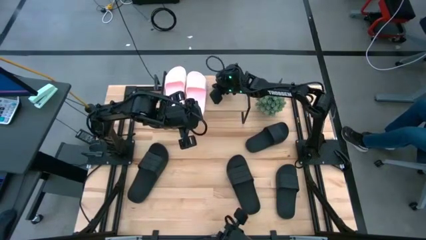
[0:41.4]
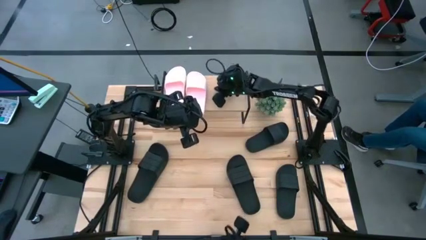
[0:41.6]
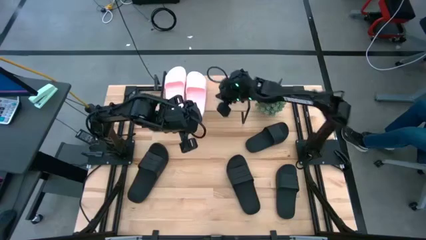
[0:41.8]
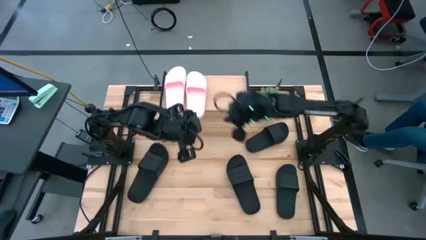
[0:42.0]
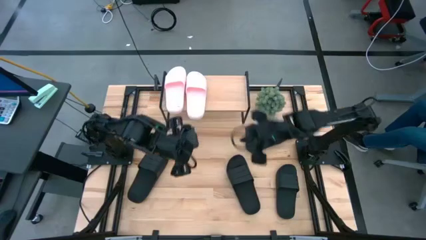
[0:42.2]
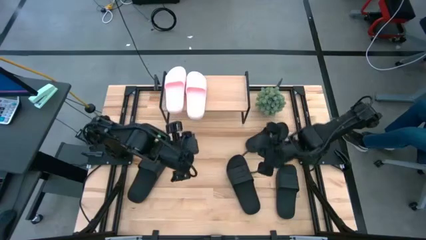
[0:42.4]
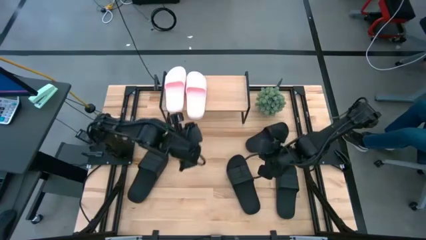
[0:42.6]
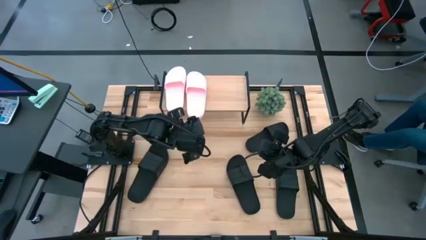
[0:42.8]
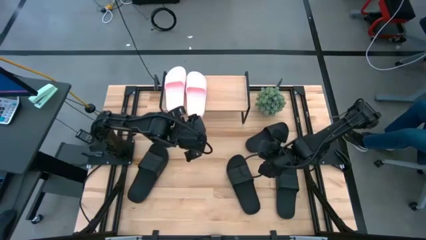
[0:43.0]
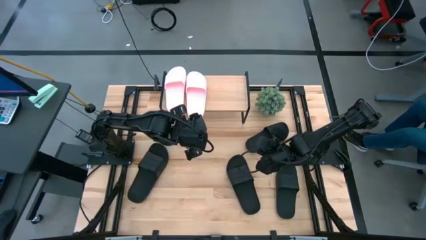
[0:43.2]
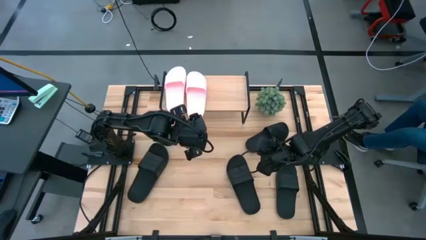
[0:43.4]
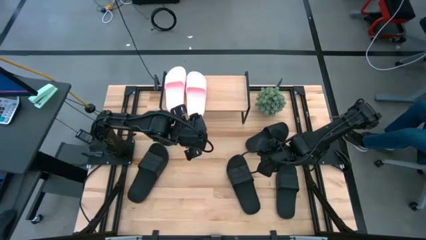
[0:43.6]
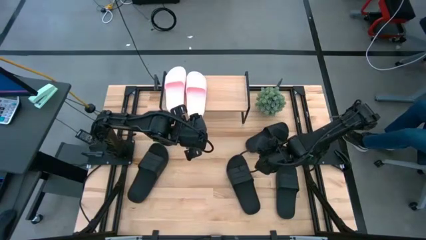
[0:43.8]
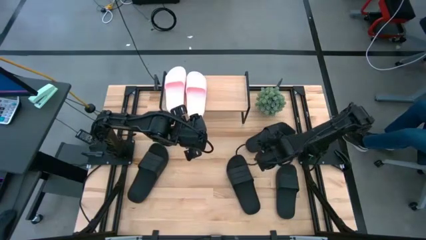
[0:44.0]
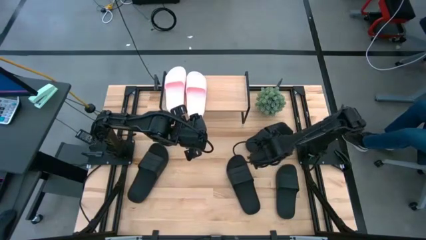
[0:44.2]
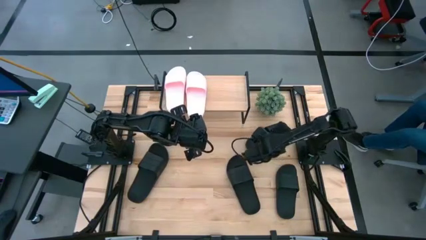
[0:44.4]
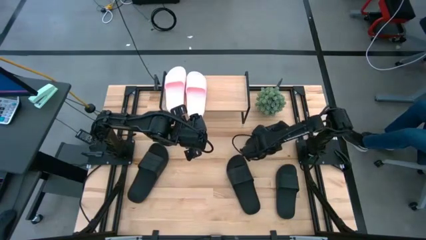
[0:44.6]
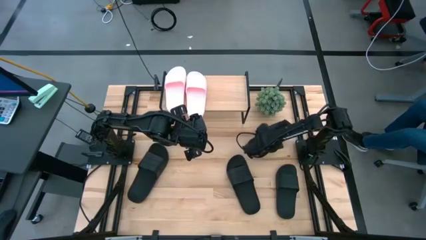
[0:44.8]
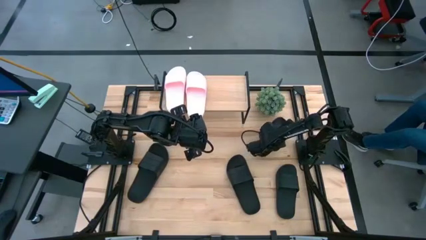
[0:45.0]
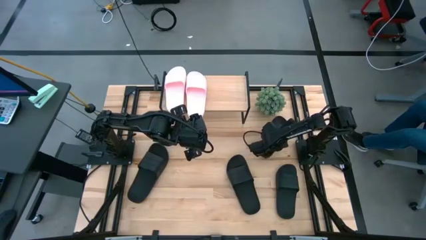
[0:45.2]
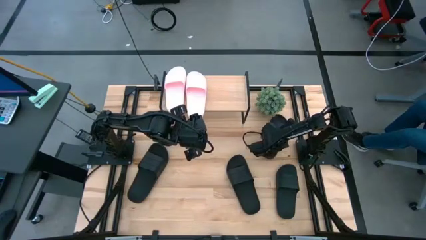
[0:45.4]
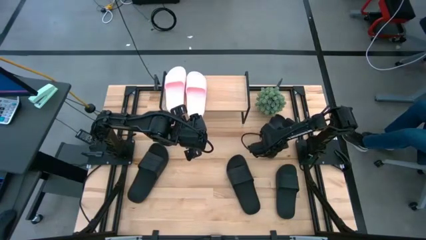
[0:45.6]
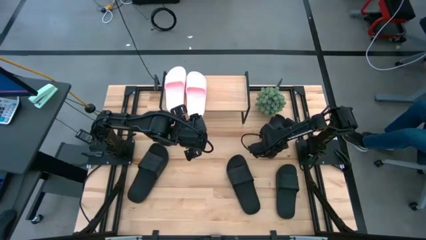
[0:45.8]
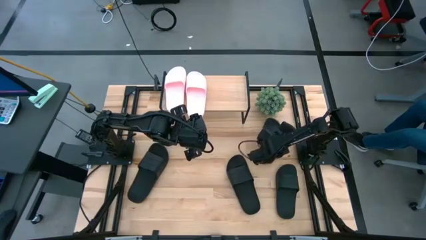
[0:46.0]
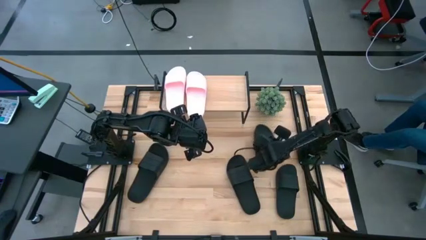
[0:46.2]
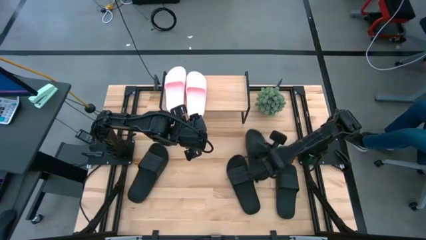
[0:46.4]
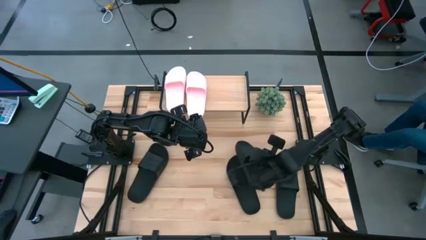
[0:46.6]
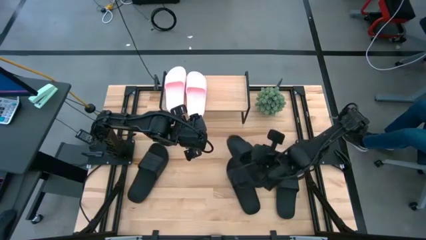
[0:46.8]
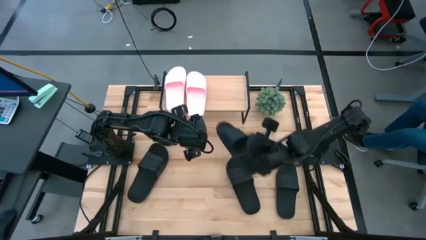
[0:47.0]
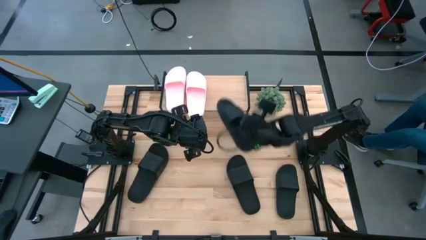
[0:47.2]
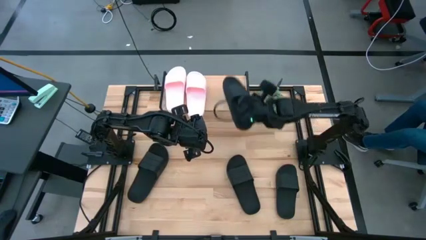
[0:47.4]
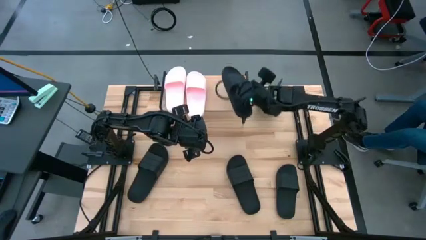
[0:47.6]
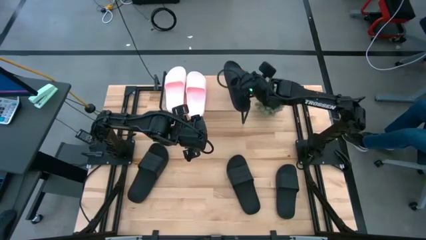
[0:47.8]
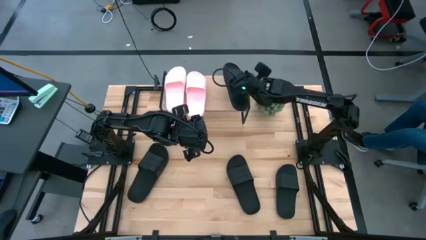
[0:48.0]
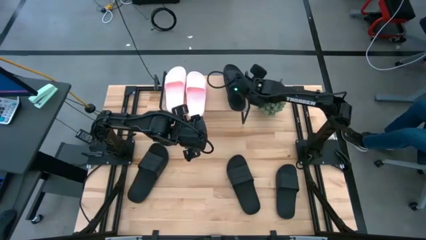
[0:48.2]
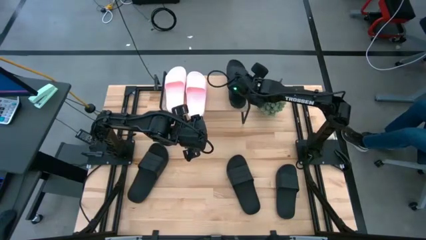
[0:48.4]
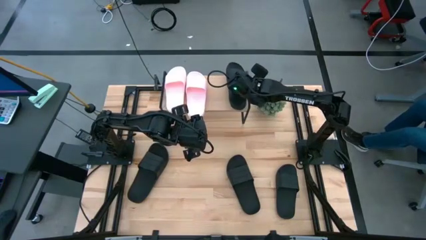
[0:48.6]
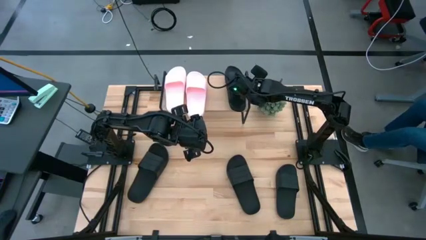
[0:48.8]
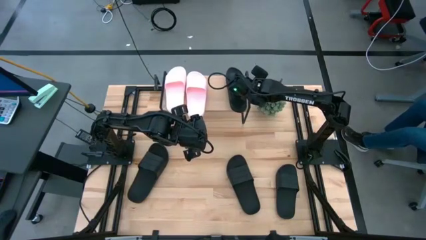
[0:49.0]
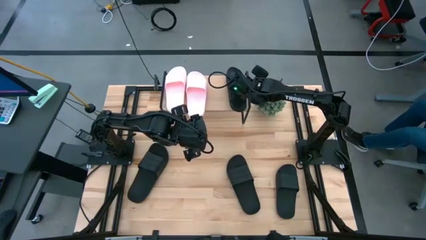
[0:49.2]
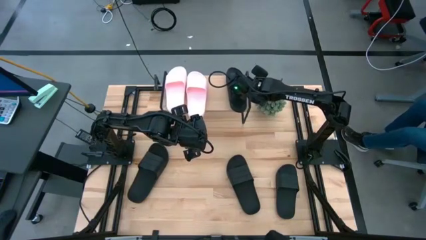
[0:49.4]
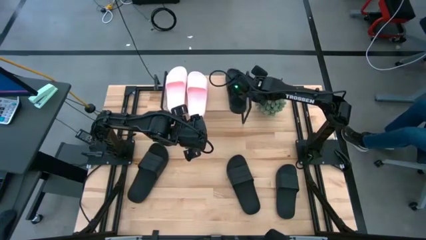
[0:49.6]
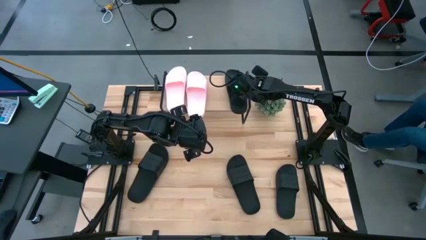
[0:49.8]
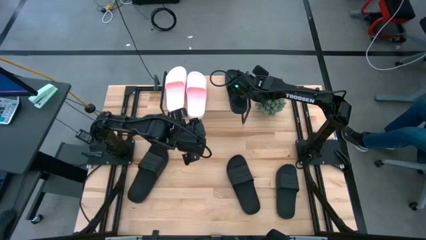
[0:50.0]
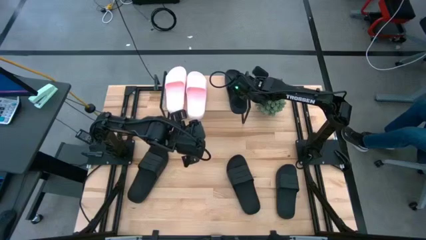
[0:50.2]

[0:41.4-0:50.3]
Task: Pick and place slides into the shelf
Put the black slipper on the shelf

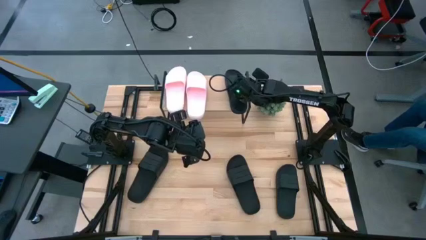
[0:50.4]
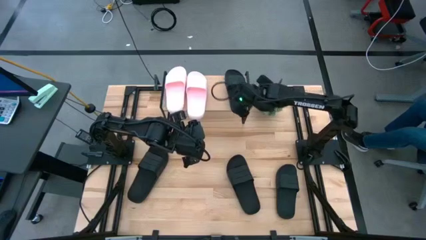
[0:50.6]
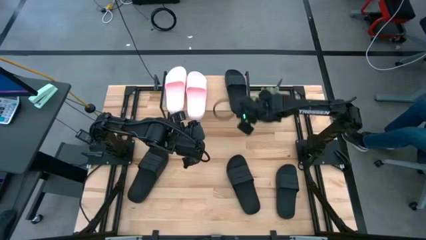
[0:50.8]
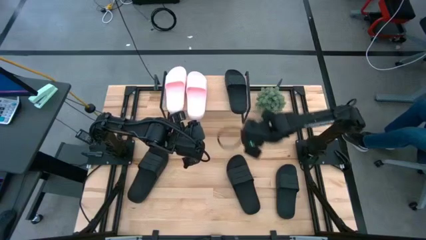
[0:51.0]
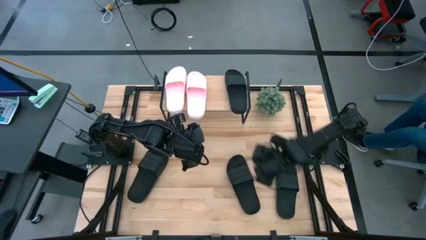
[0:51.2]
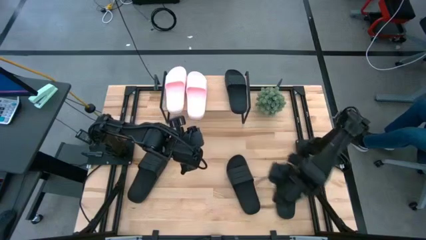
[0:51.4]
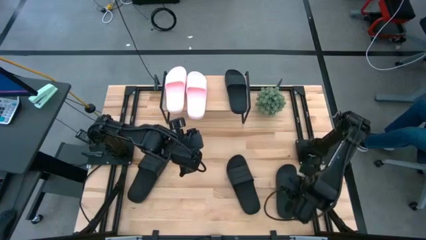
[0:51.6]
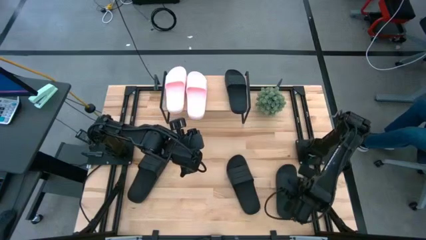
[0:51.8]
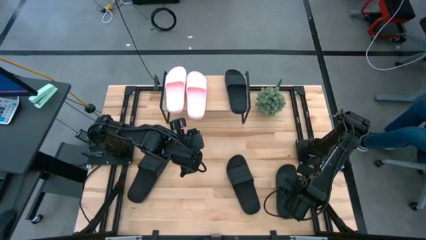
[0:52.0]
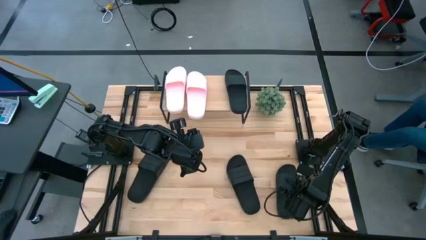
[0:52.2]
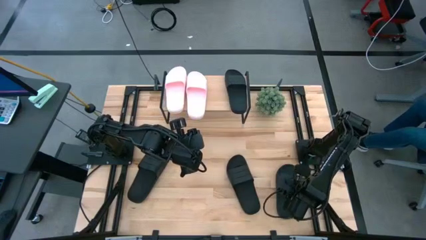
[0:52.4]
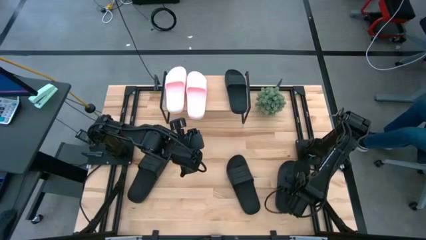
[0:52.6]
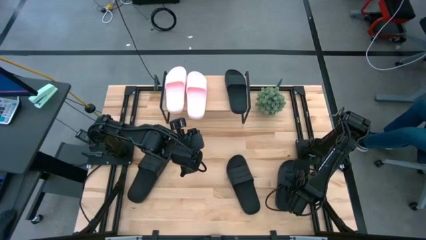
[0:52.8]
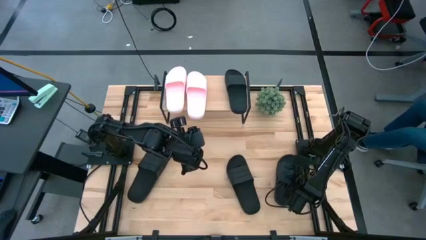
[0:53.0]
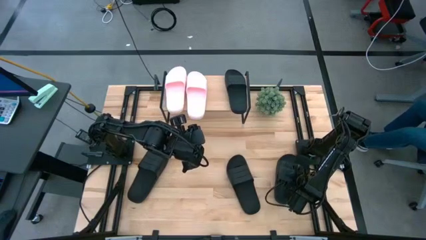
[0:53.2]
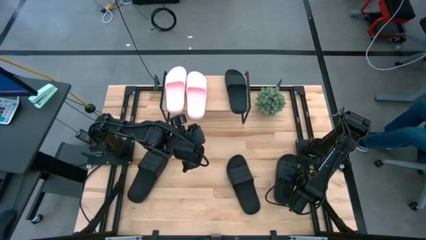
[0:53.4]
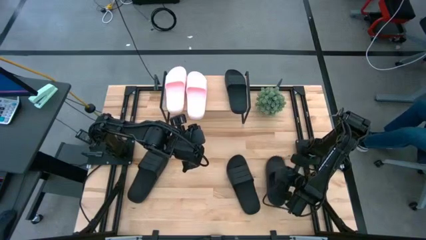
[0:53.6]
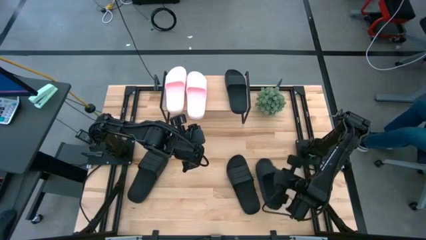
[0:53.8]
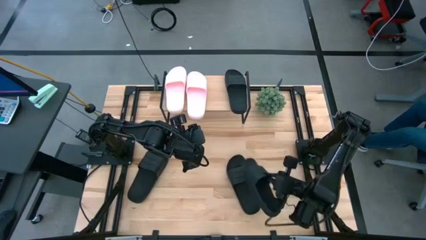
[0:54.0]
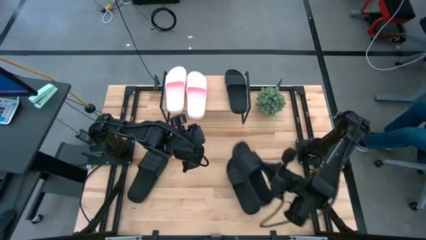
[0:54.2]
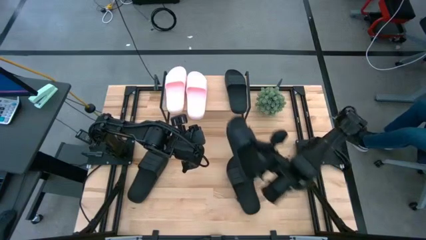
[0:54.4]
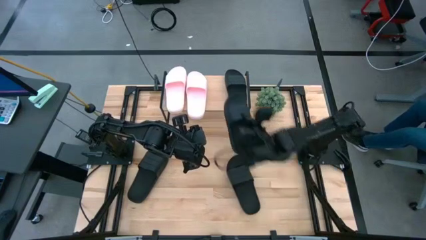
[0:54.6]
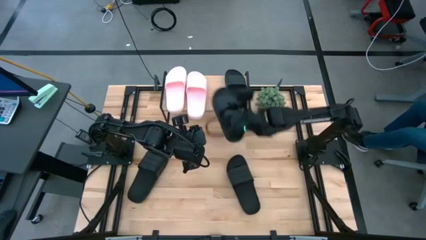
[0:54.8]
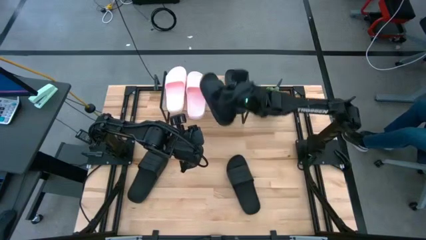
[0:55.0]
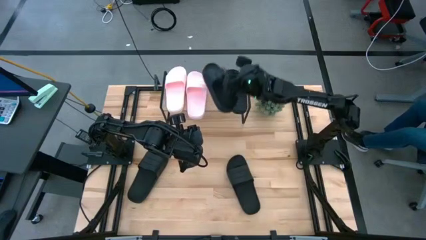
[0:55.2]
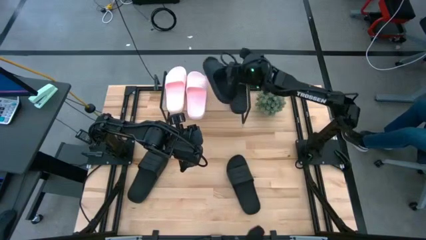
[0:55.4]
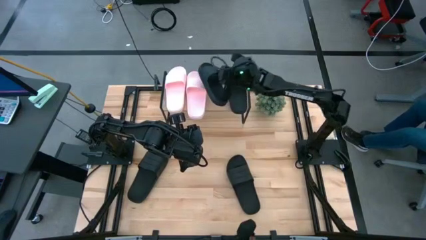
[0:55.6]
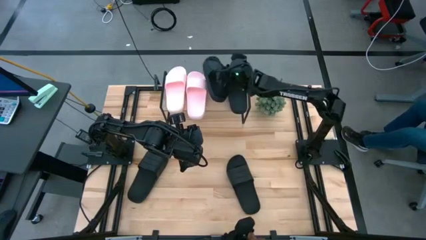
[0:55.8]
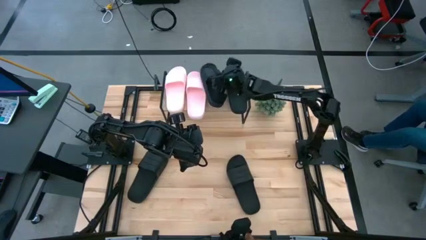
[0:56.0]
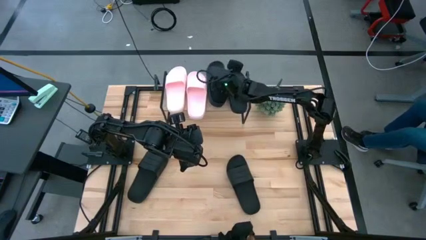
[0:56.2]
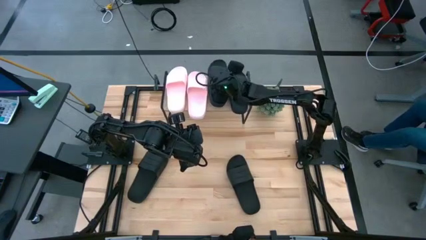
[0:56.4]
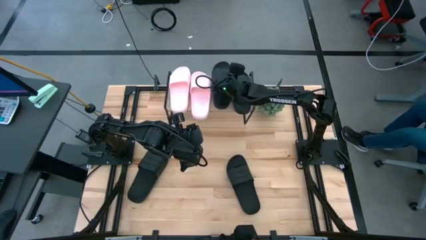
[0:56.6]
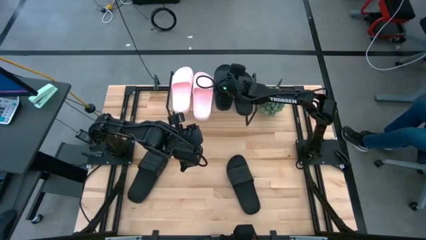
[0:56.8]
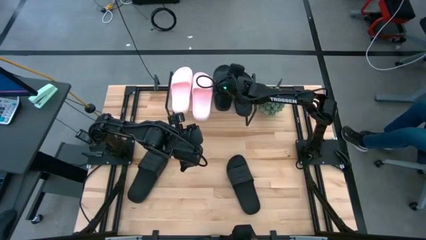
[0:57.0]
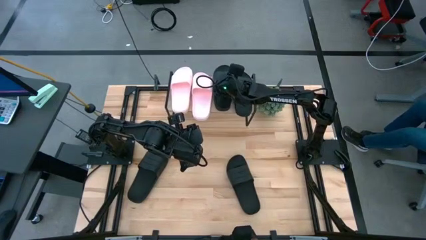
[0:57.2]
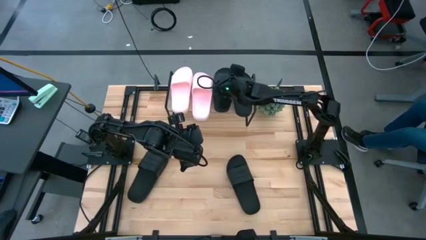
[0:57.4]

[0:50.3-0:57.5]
Put the black slipper on the shelf

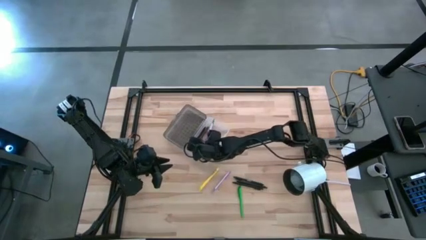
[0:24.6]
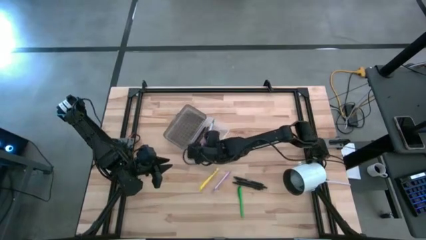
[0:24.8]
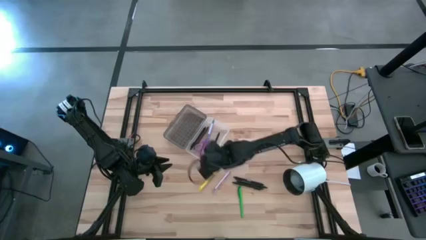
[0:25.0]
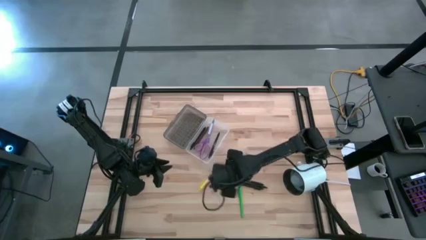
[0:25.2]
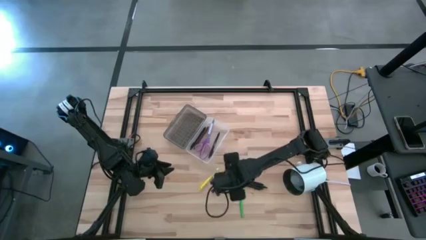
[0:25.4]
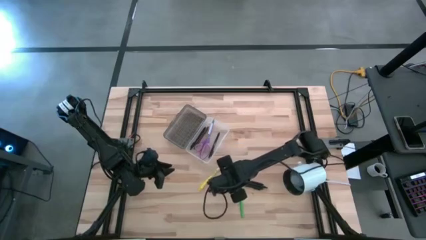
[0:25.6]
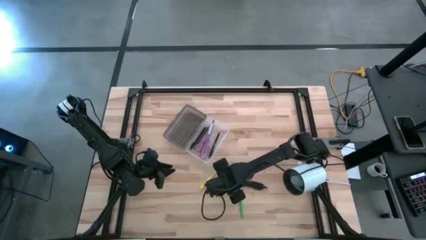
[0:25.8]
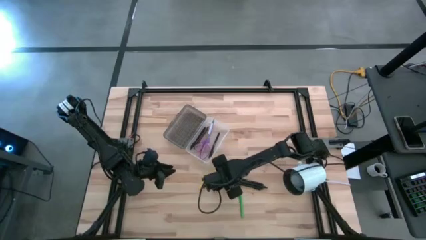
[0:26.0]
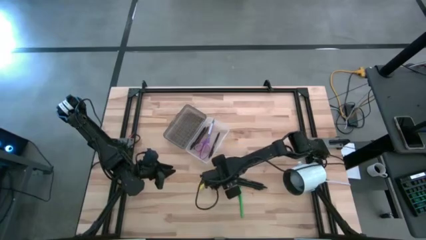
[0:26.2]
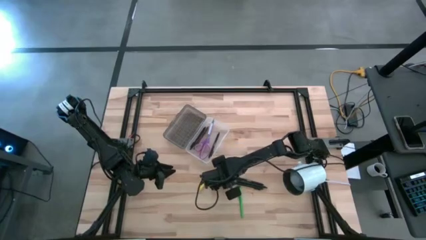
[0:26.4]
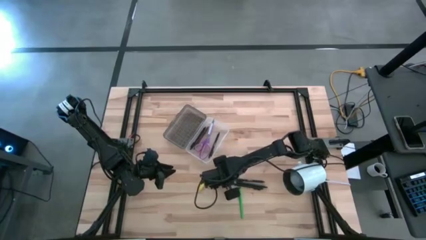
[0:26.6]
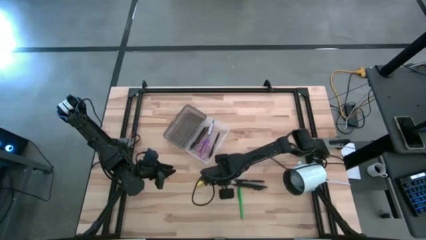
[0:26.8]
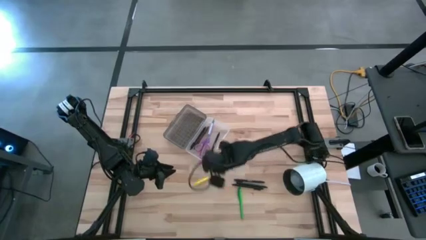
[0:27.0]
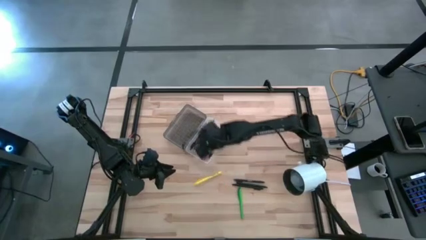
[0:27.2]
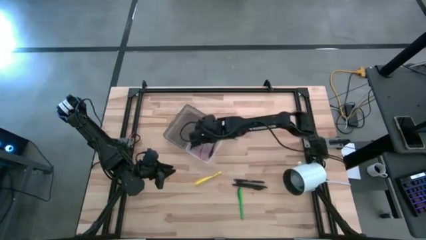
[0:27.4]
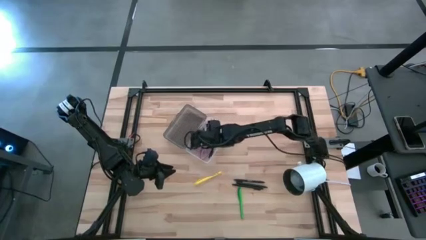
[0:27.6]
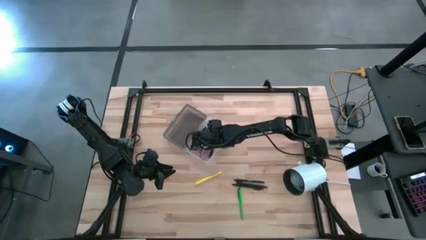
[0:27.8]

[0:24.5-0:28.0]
Task: Pick & place school supplies into a supply box
Put the purple pen into the black supply box
